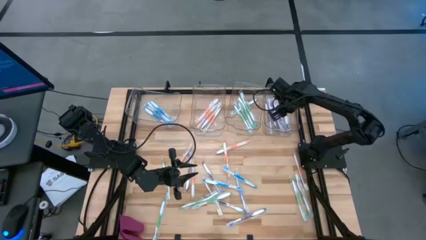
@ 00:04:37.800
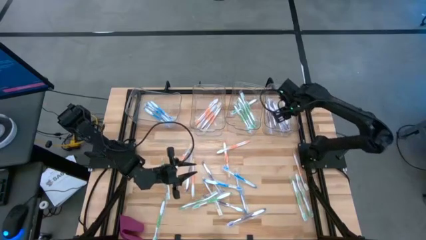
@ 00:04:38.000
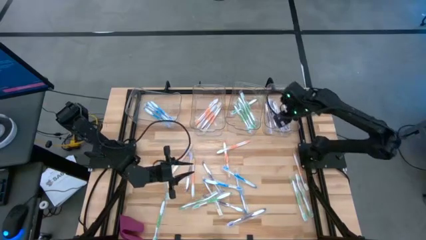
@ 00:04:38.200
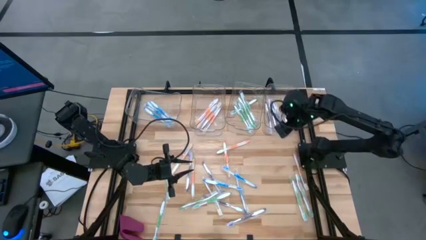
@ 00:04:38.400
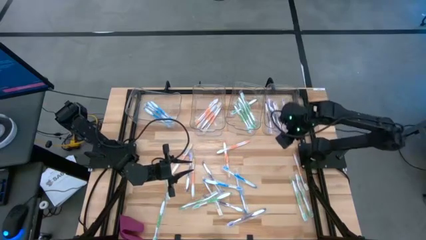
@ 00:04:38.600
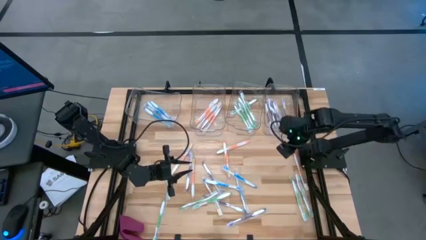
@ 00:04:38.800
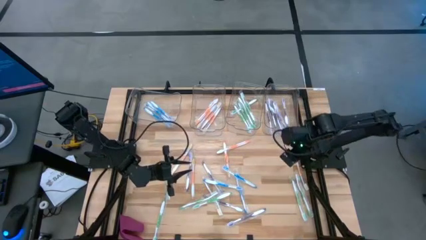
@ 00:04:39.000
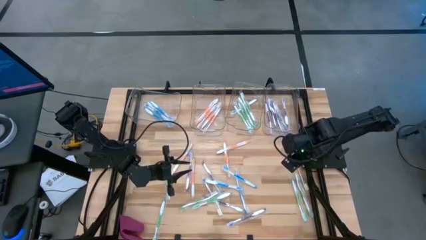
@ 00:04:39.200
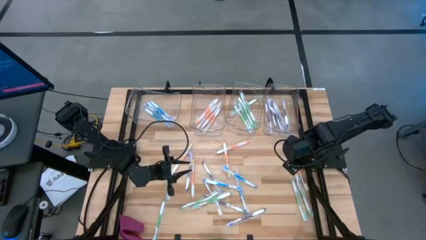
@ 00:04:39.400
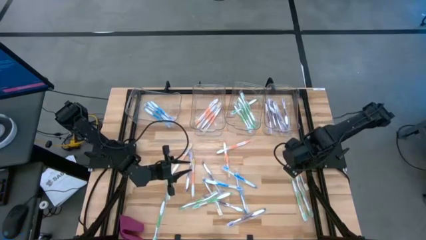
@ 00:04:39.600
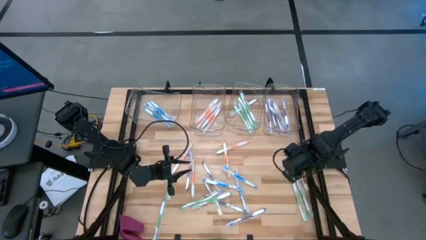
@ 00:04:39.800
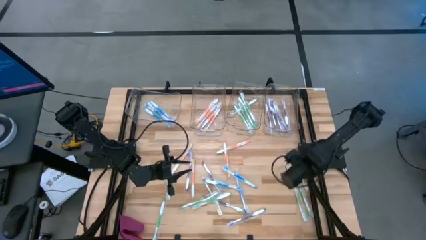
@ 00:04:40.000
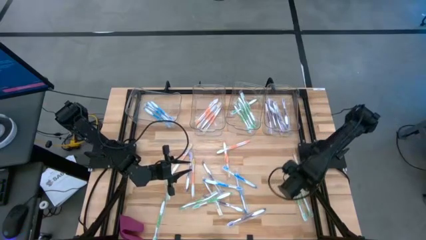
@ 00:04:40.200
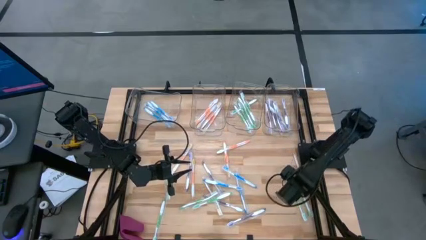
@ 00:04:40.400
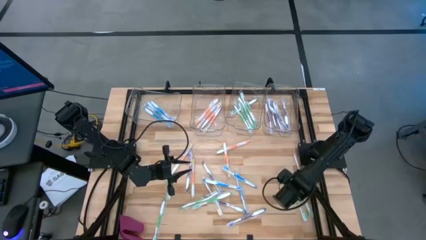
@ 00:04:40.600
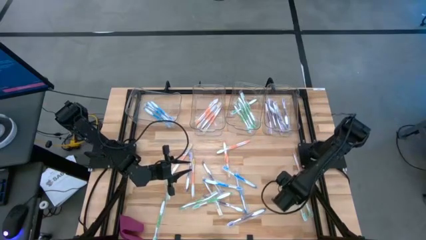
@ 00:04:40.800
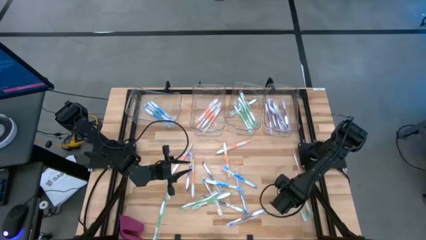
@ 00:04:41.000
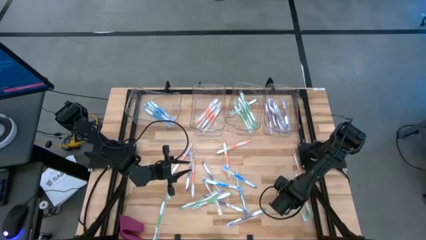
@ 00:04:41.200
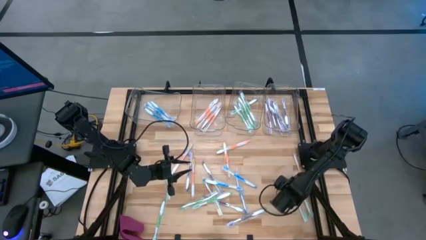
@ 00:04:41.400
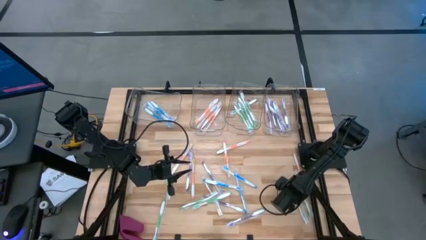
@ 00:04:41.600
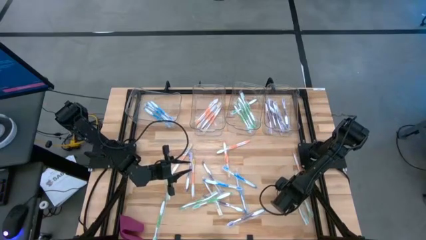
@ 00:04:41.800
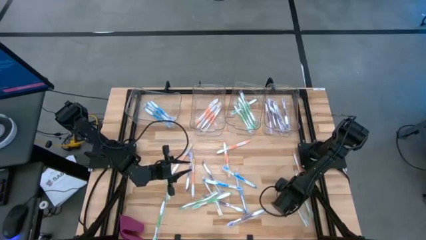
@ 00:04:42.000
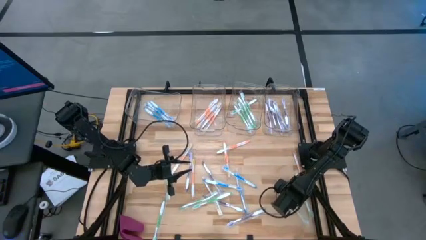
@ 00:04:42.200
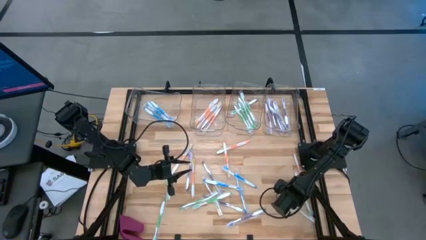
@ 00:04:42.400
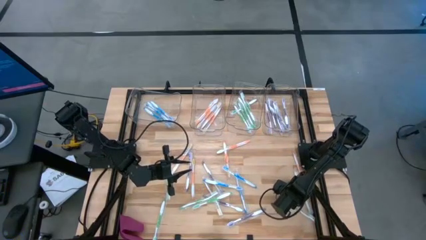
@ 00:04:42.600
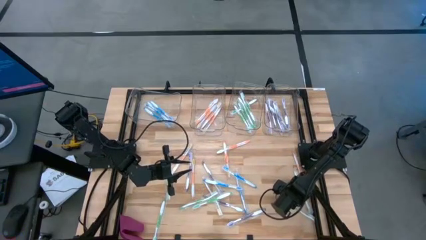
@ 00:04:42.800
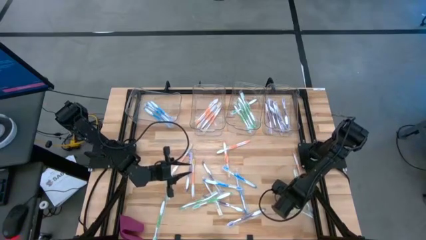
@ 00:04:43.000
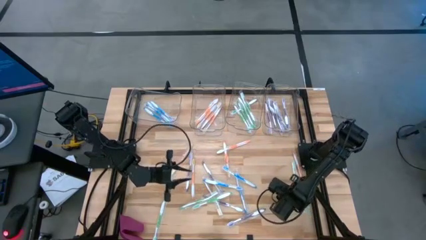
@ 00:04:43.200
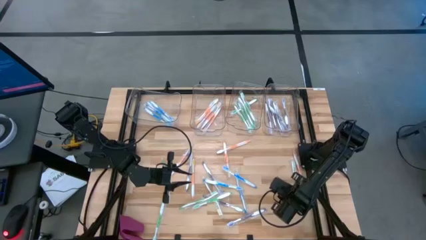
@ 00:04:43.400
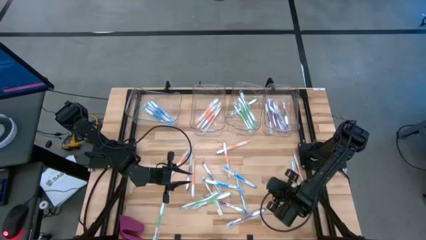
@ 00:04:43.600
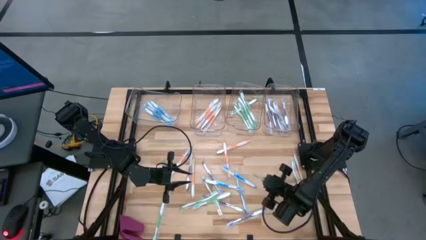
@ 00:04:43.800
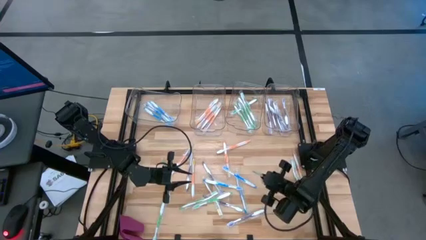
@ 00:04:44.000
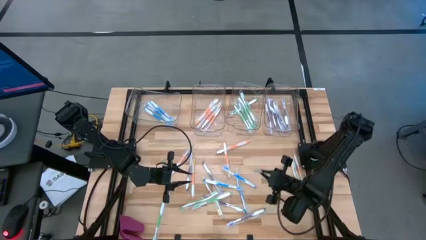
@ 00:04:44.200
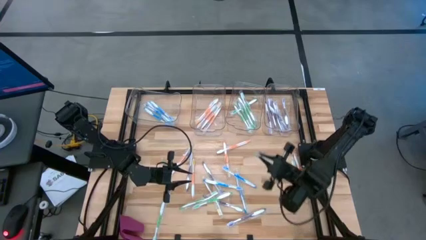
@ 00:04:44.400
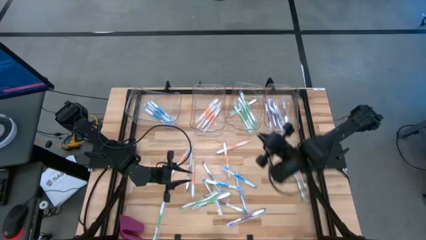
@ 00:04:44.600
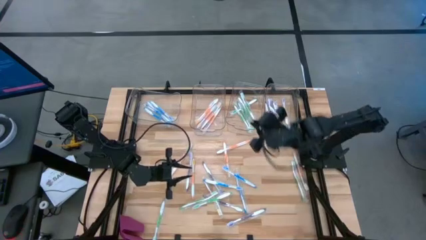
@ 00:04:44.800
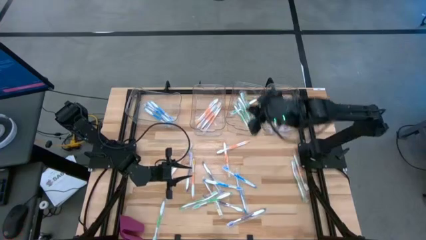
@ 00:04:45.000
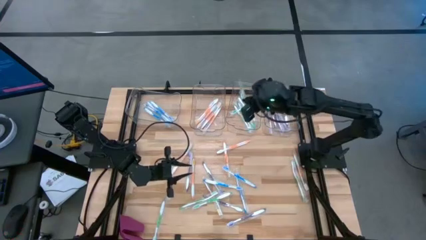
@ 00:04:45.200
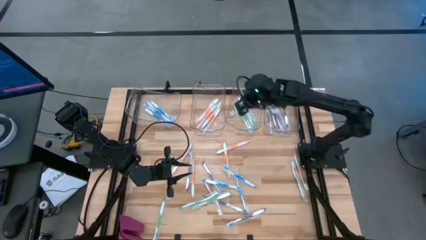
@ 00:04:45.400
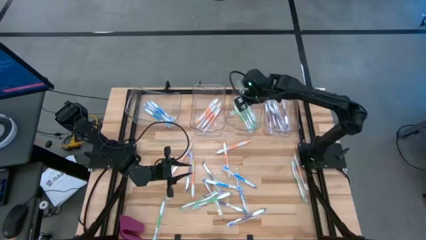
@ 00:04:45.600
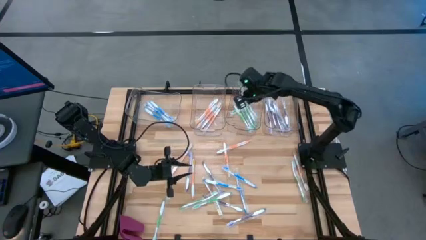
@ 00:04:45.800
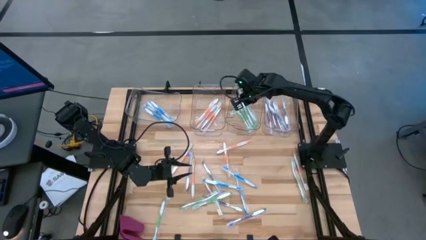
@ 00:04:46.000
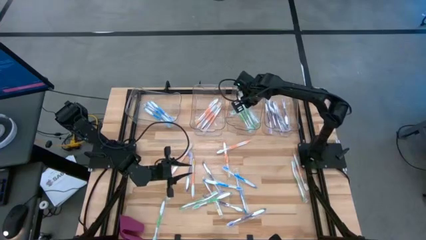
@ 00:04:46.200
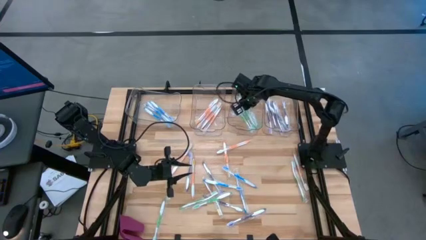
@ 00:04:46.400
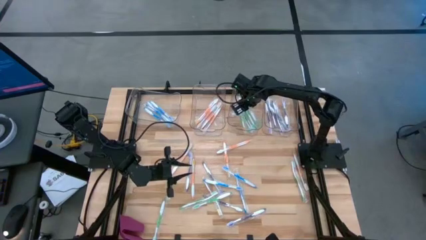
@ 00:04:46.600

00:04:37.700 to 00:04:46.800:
Task: Pick & Place Toothbrushes
Put the green toothbrush into the middle right transparent bin

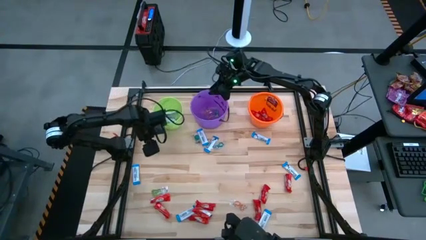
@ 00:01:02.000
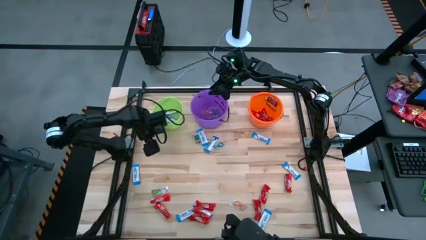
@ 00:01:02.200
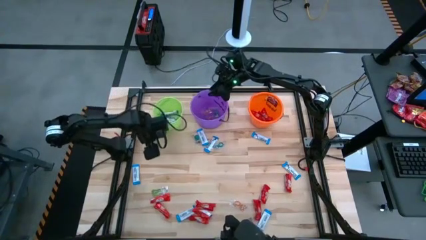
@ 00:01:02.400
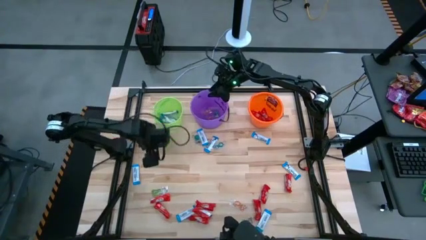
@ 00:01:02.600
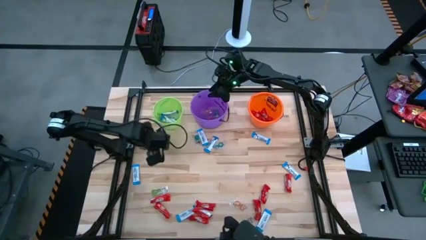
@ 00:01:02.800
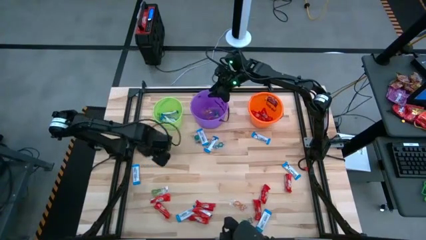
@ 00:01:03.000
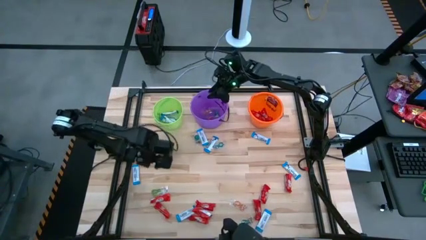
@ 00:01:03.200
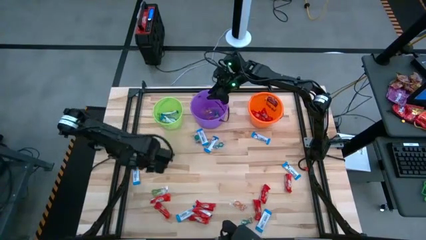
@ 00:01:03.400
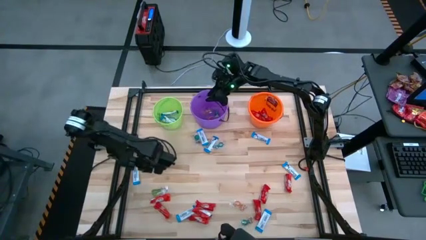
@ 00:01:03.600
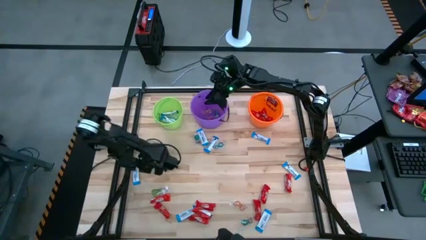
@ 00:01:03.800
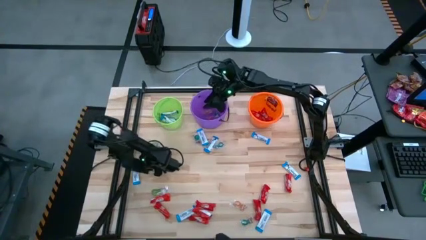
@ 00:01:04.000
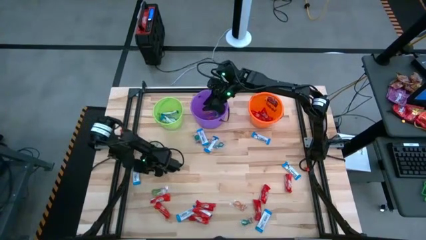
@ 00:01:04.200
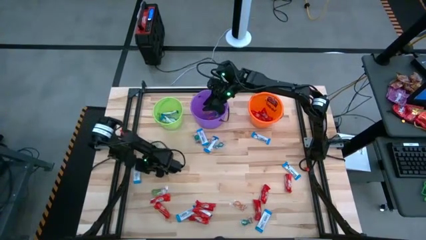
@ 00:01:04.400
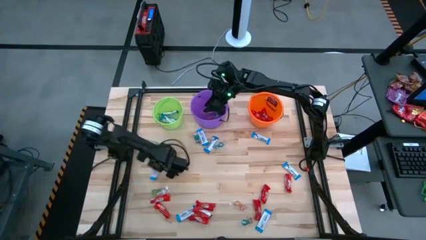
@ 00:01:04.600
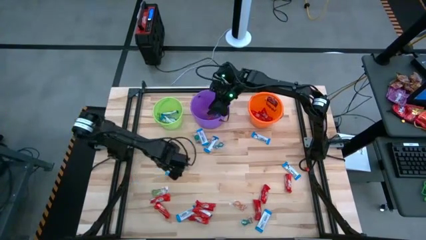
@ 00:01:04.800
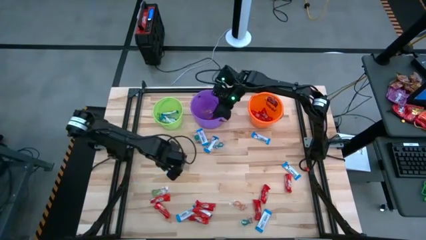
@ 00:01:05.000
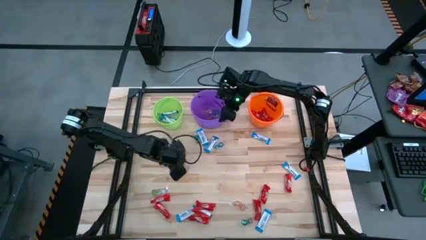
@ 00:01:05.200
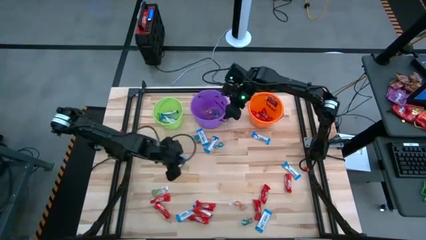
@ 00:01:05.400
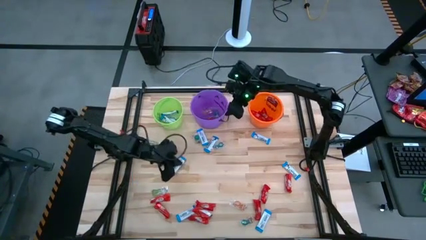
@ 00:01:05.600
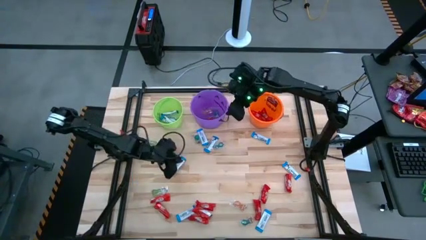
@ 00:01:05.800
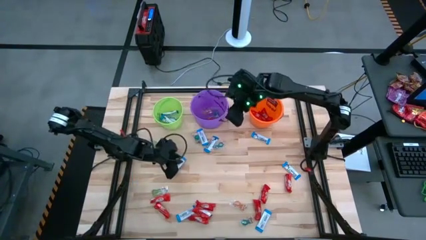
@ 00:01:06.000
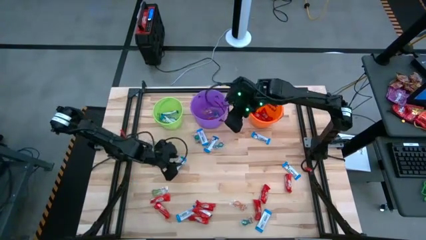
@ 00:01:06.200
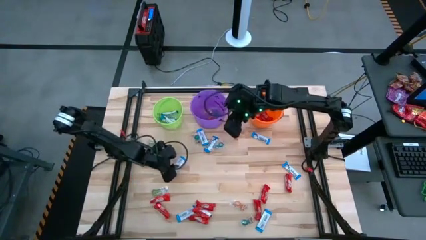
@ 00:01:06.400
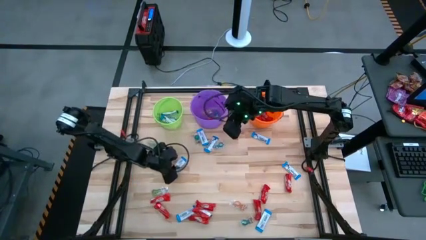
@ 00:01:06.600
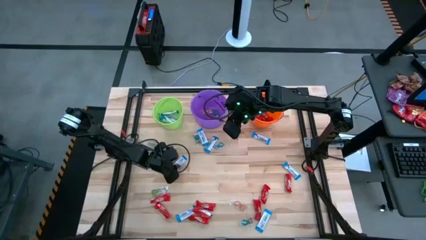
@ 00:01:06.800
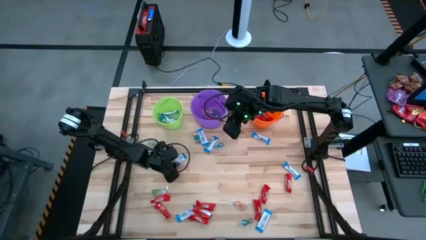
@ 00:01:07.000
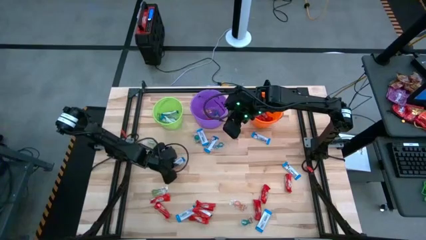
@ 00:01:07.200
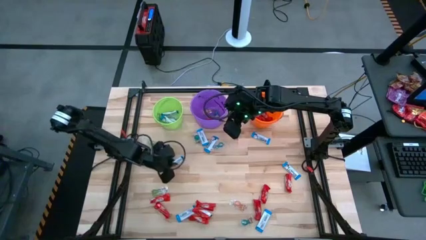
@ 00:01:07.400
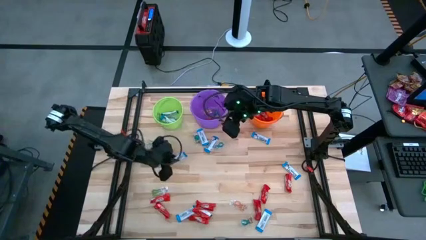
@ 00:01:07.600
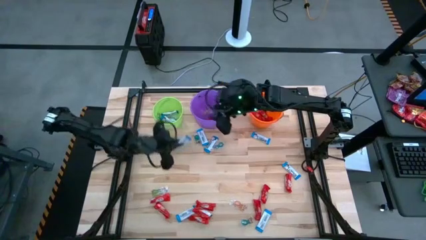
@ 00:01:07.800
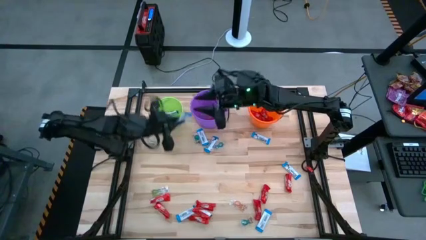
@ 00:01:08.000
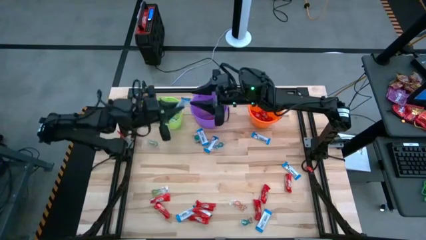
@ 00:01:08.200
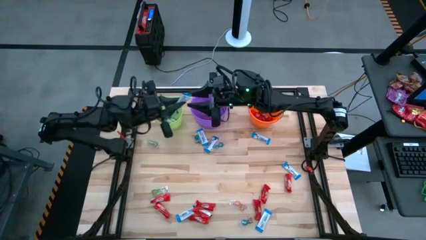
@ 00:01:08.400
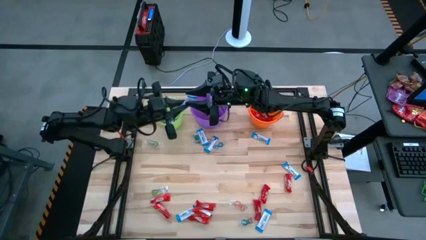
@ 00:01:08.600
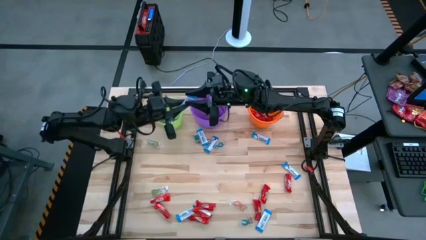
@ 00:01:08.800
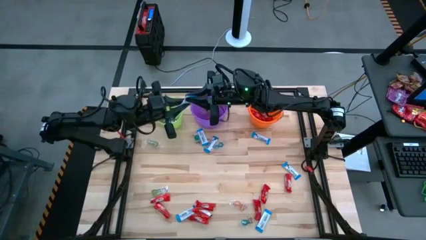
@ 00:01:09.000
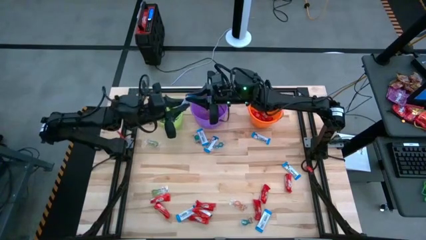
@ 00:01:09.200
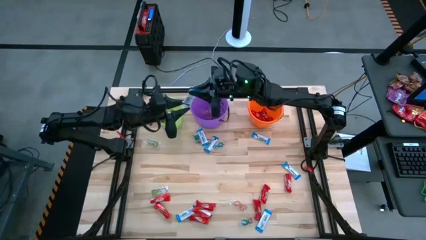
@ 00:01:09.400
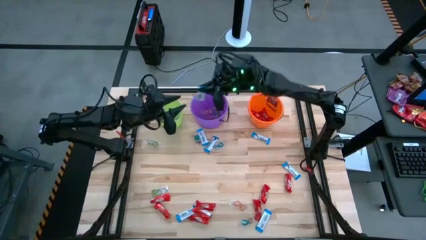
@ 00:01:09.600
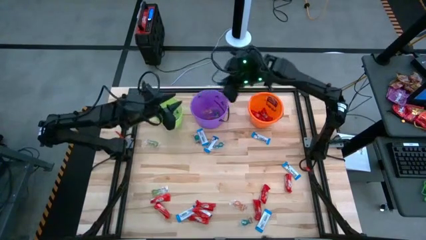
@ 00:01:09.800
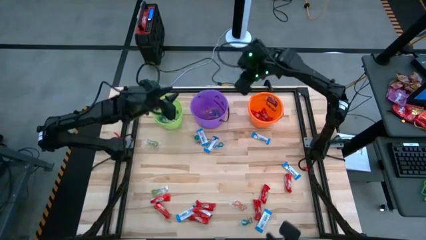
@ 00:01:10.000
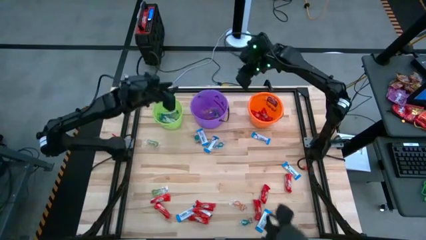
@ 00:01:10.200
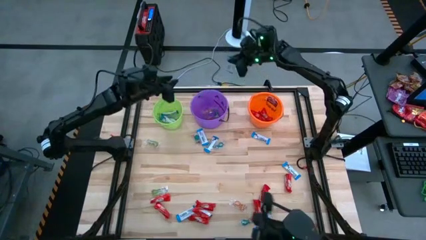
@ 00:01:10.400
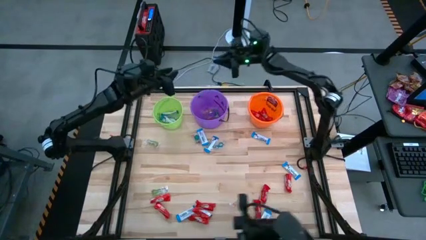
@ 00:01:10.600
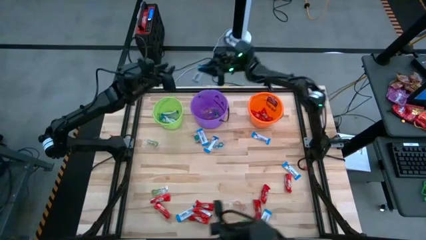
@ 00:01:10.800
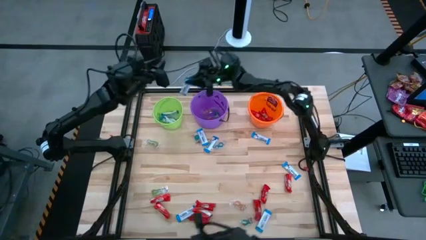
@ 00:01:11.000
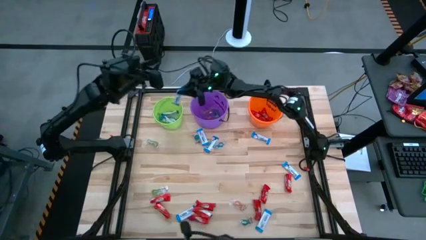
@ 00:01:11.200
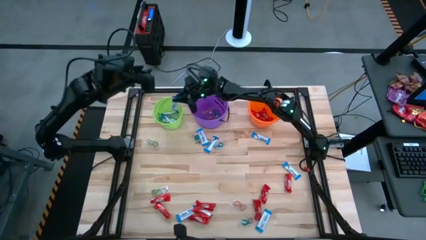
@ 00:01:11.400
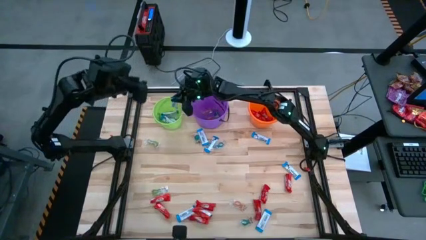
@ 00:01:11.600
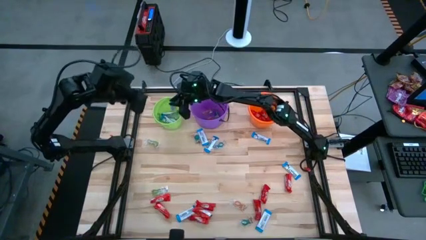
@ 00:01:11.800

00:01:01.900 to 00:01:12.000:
Task: Sort candy by brand, put in halloween buckets
Put the white chocolate into the green bucket
